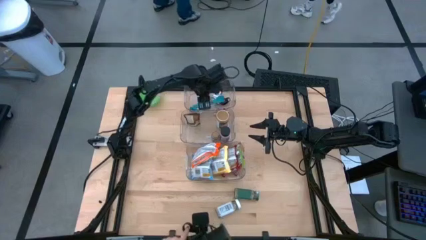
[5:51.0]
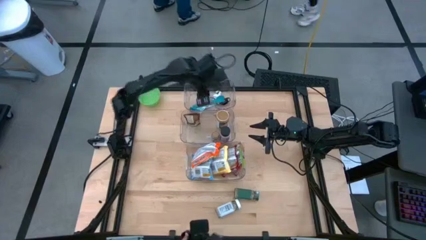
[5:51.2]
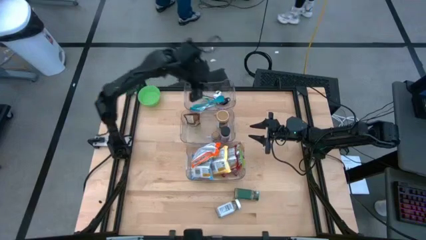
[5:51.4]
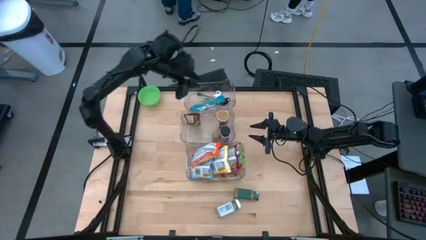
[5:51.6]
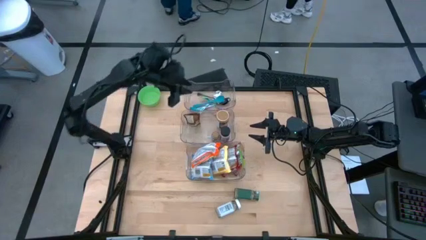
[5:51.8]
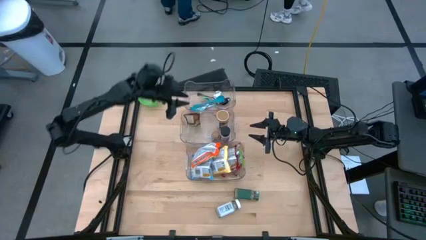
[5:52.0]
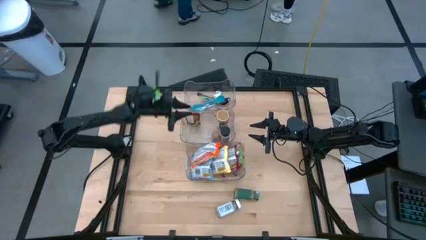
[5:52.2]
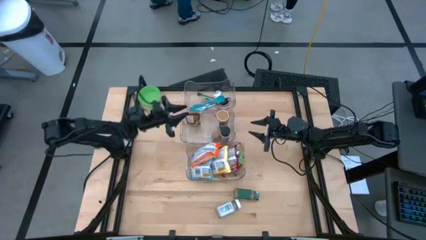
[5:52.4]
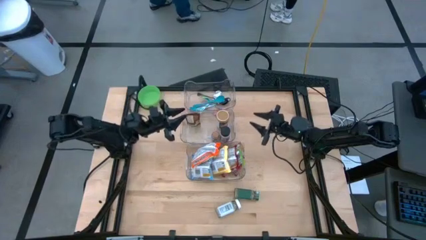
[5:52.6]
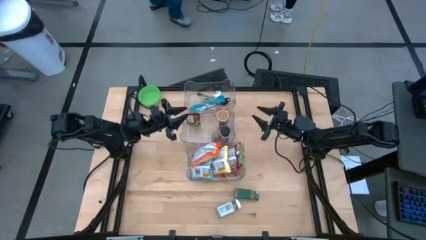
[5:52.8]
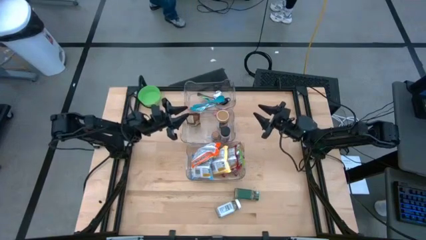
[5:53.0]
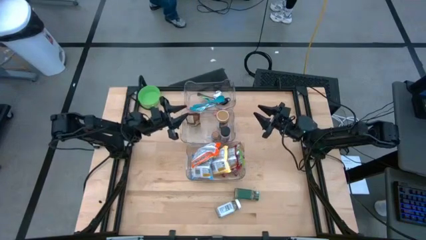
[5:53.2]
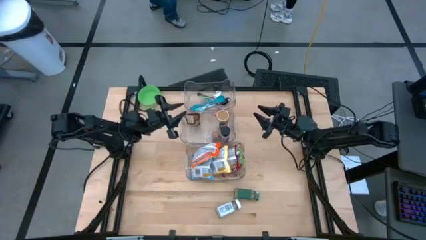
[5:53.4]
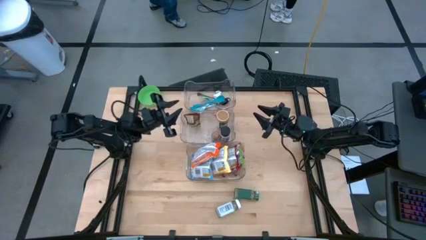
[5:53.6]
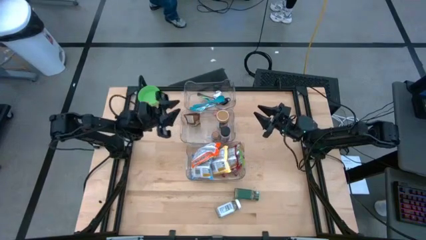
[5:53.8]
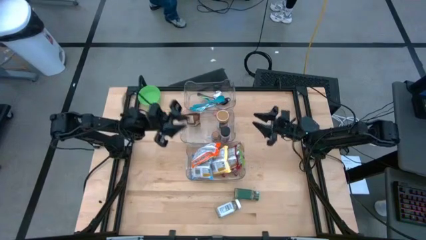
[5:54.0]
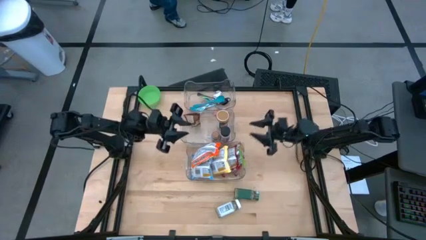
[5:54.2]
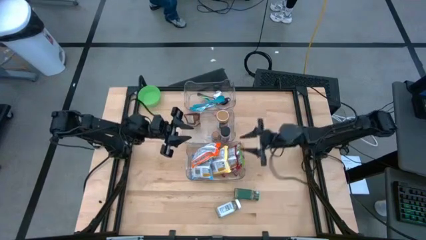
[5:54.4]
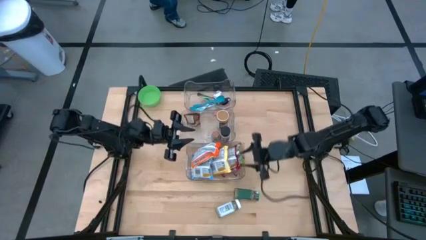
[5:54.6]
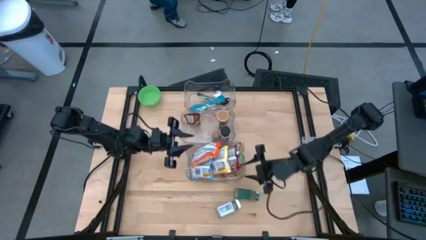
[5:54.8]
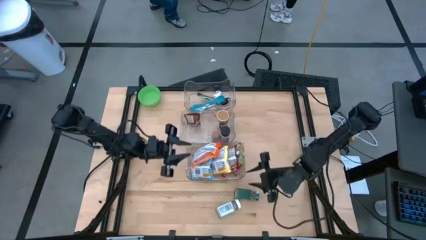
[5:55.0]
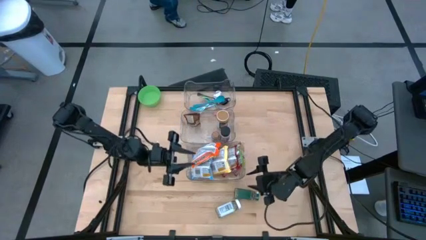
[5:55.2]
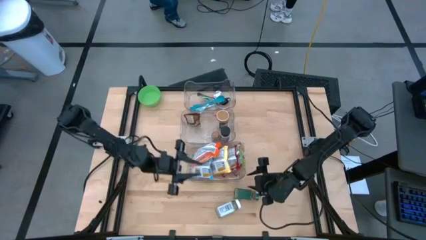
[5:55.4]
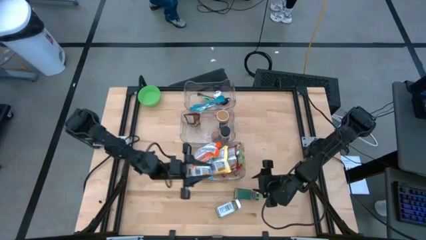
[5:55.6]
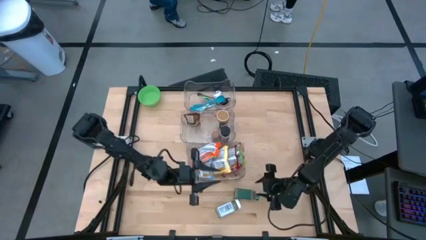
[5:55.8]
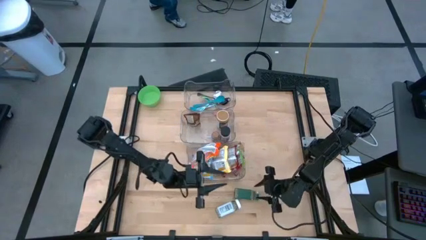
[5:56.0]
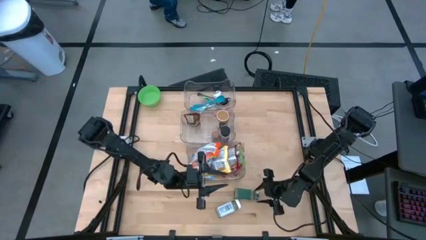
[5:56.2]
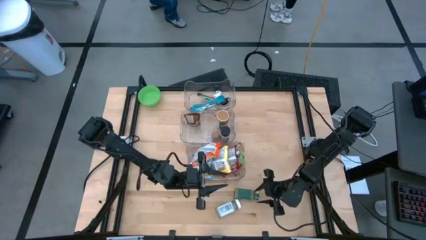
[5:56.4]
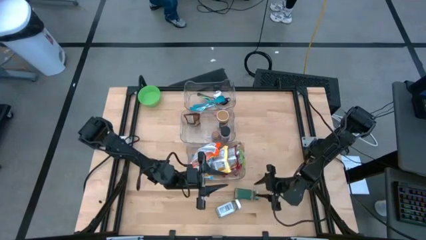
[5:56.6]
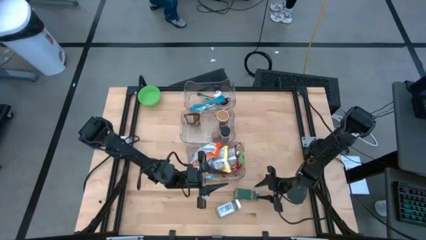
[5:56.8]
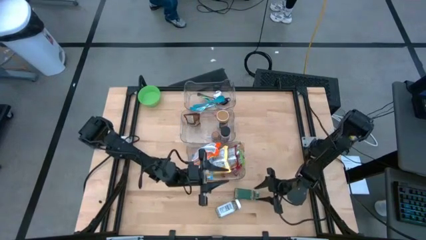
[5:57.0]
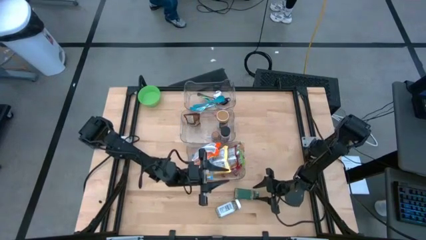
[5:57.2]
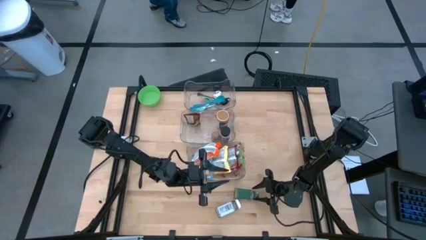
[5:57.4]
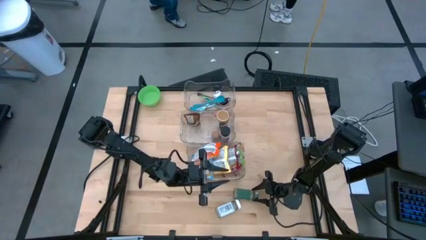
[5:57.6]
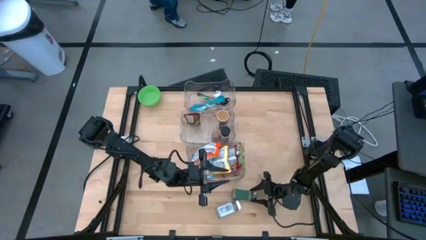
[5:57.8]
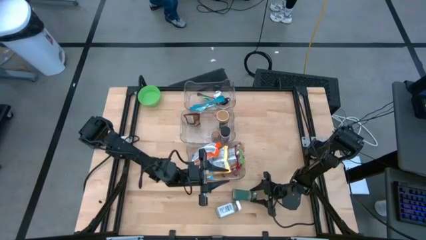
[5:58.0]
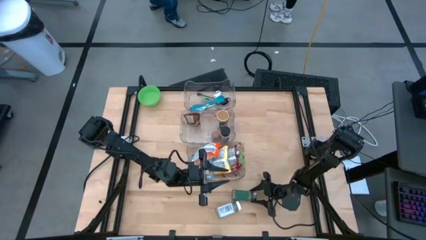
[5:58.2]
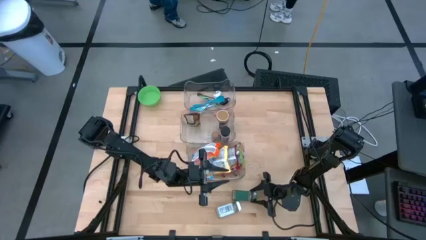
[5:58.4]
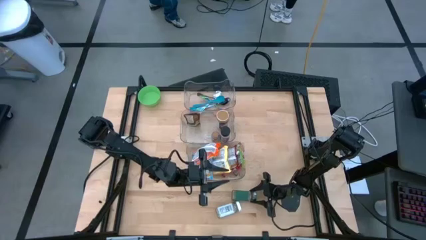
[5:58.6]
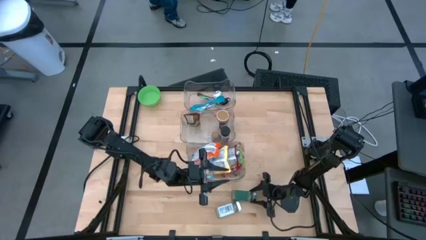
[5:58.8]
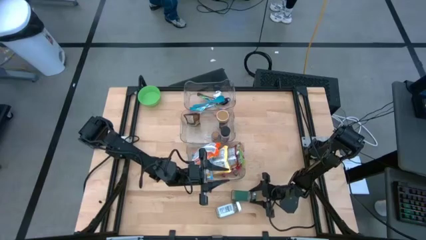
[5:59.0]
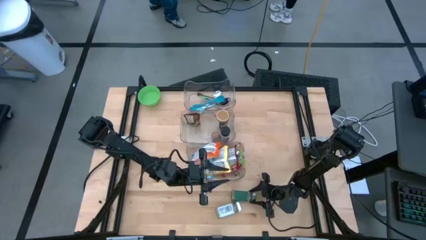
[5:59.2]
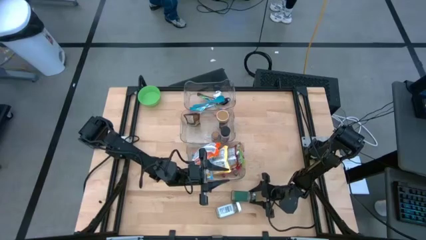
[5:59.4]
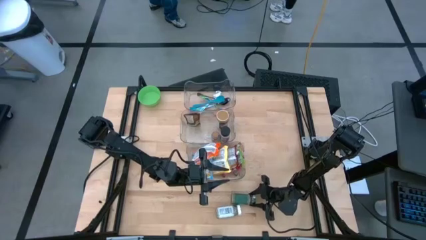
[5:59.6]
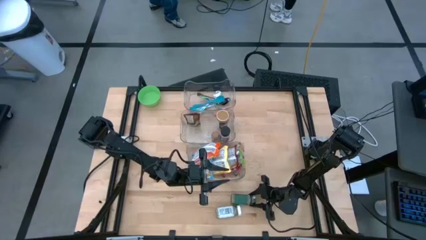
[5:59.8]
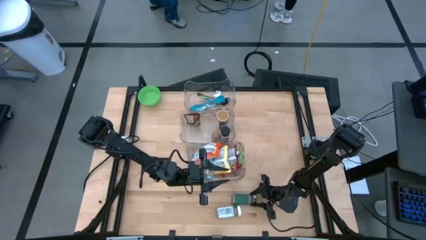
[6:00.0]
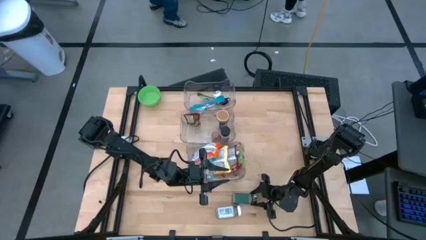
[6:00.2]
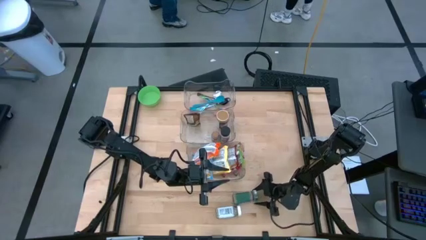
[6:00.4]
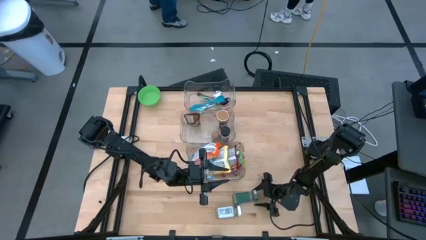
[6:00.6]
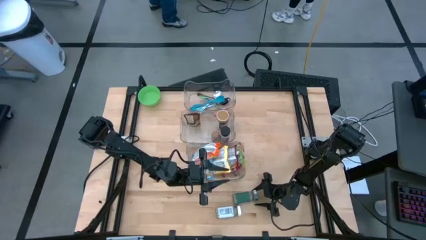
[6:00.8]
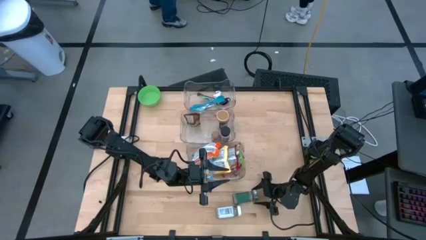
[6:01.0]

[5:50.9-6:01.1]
Task: Pick & Place Food Item
Put the green seasoning bottle into the middle transparent bin

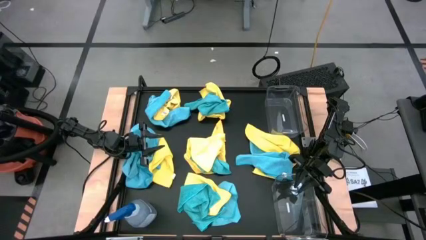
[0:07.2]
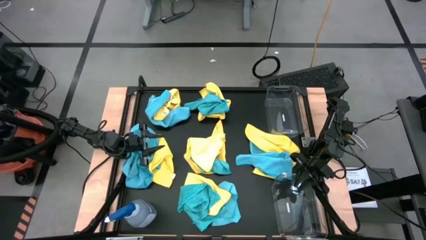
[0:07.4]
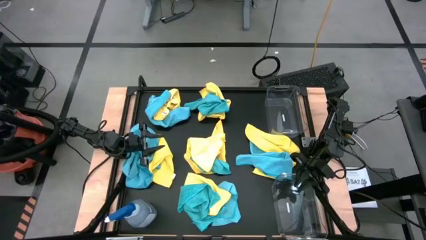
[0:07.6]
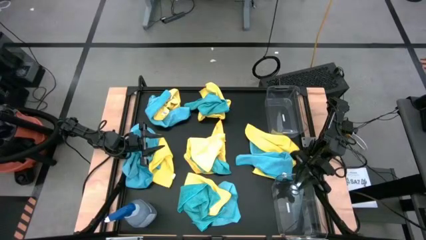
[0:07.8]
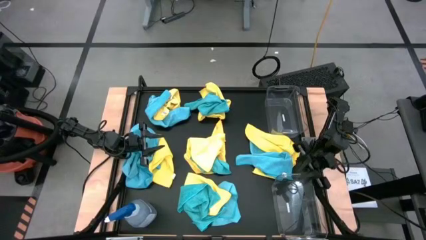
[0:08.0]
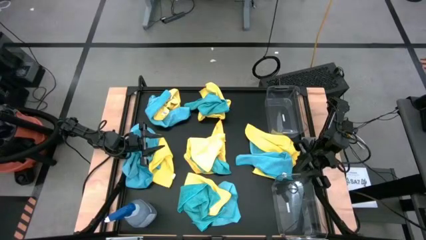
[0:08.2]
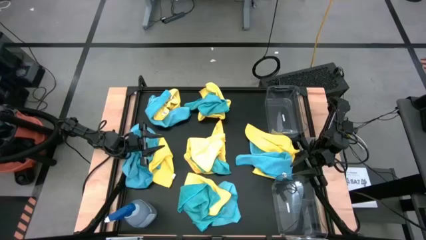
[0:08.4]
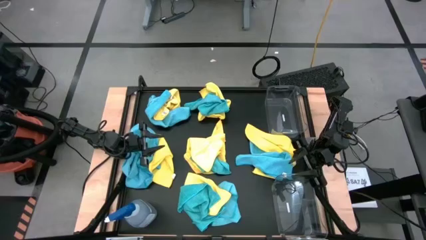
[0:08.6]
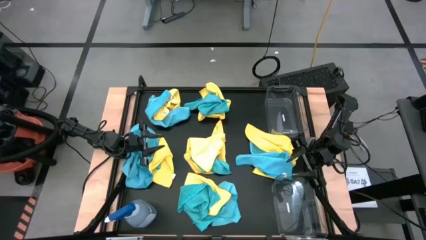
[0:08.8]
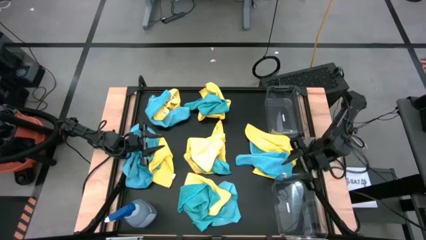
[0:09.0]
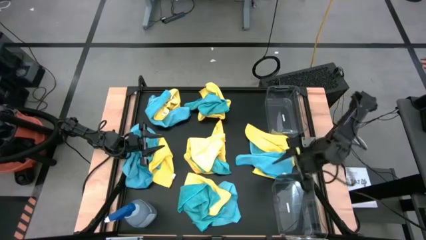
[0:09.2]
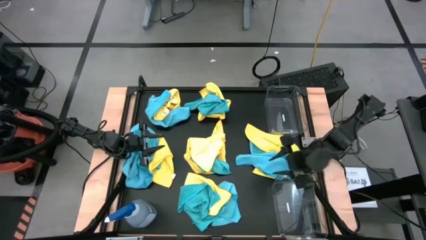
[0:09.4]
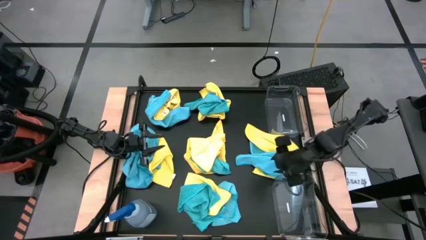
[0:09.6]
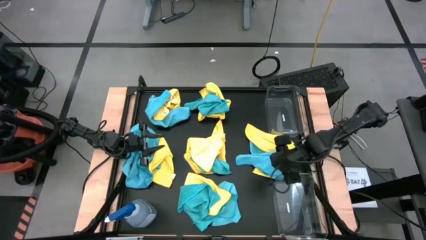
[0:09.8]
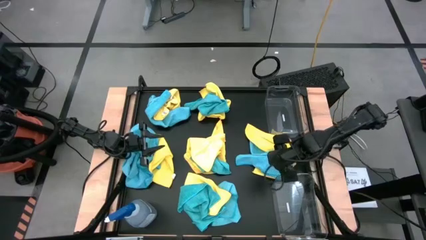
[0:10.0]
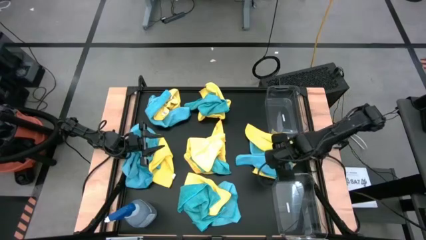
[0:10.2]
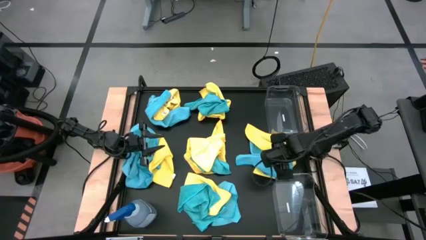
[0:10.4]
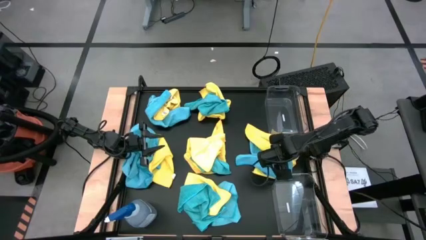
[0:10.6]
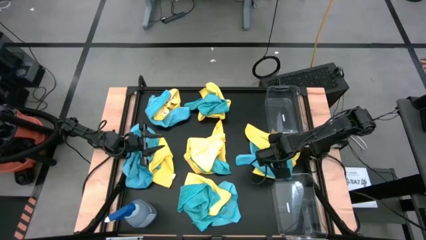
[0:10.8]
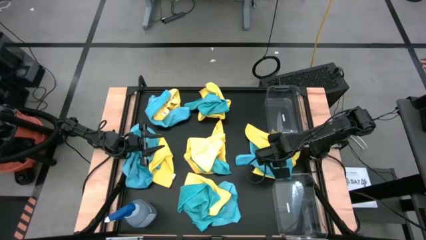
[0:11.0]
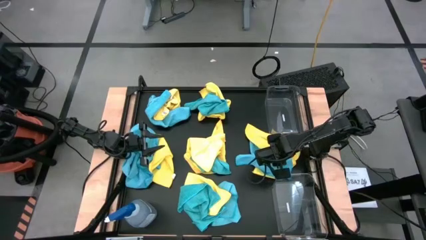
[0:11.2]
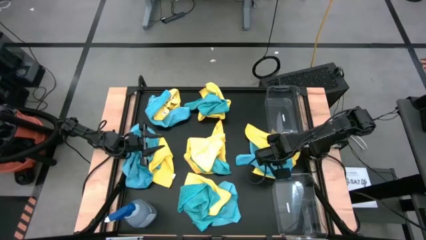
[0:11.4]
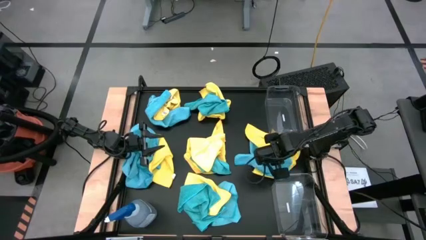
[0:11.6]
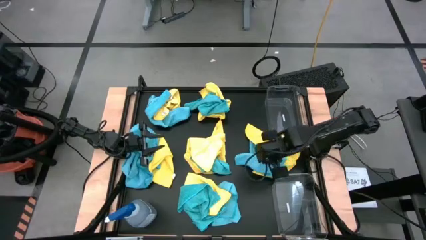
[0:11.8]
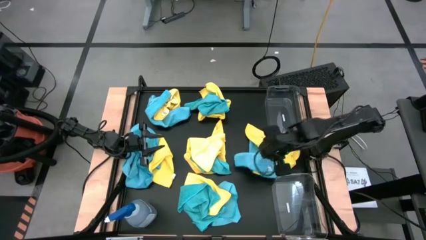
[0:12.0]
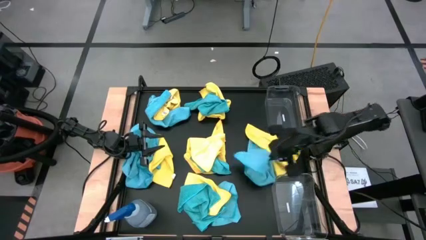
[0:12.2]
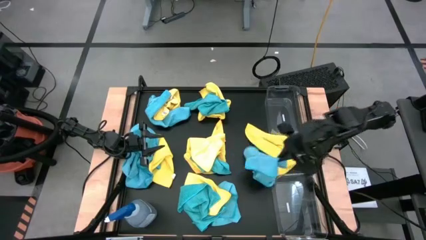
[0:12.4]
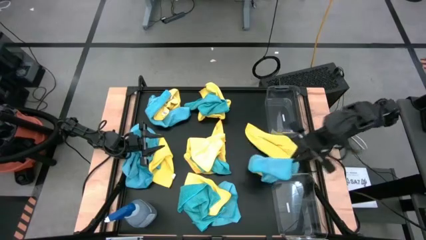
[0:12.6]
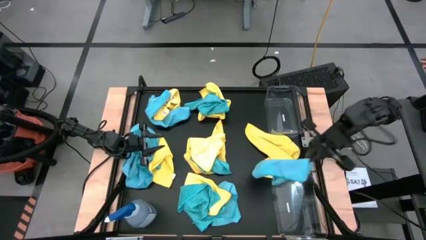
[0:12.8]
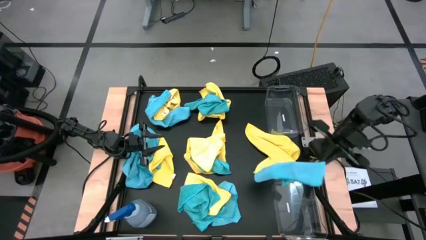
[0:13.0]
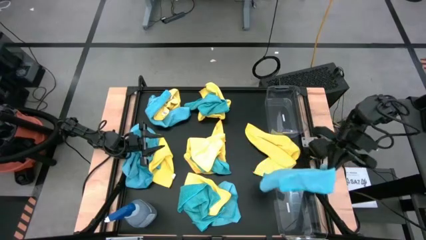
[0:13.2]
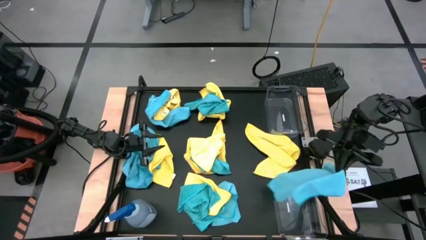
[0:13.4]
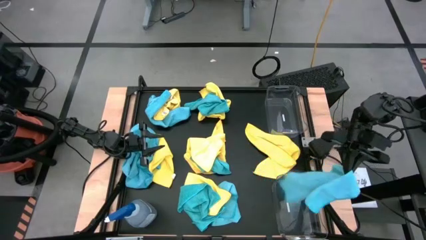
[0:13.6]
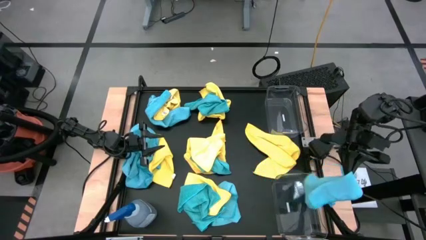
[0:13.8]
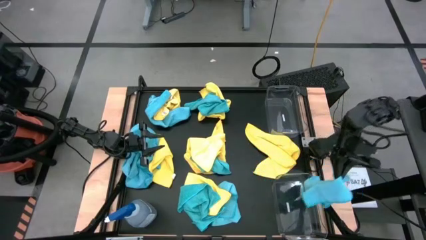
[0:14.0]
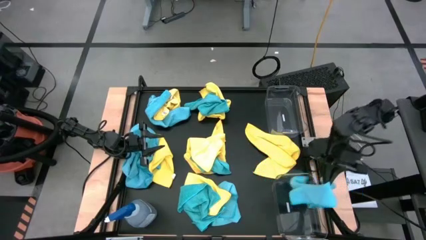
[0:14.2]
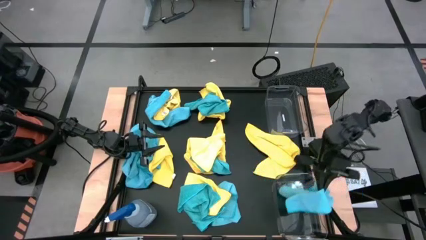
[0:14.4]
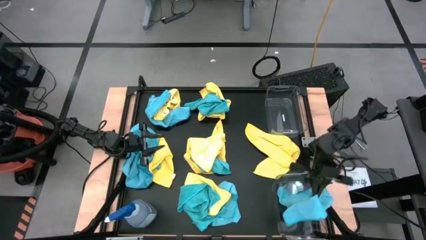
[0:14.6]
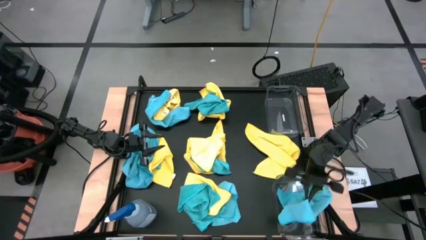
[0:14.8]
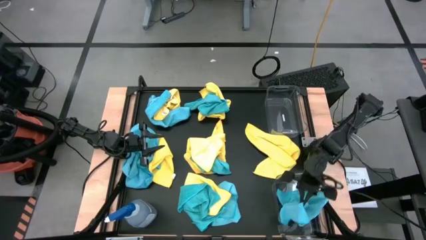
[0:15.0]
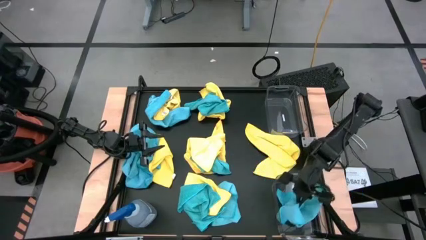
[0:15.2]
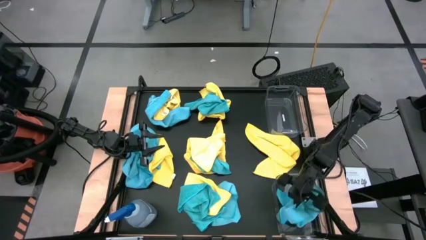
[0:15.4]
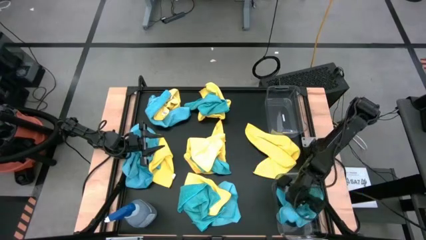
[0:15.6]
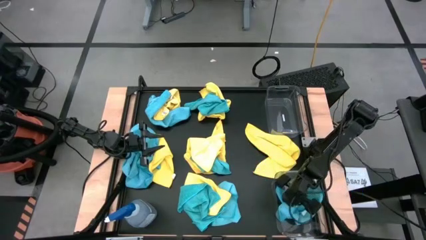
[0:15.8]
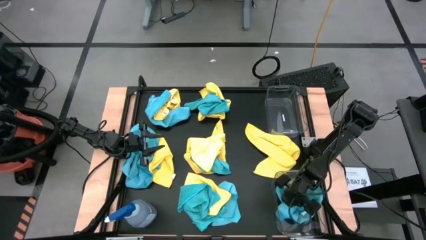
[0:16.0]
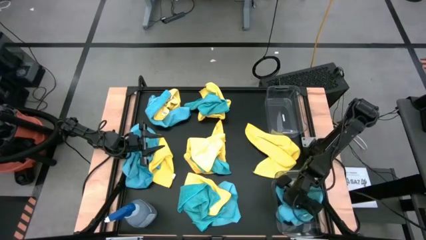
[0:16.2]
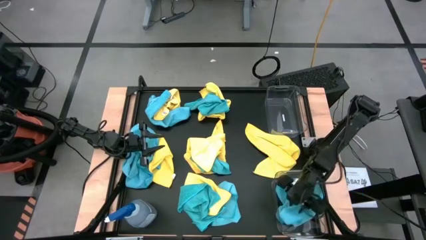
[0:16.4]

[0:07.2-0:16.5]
Task: Sort microfiber towel by color & place in baskets
Put the blue towel into the bottom transparent bin
